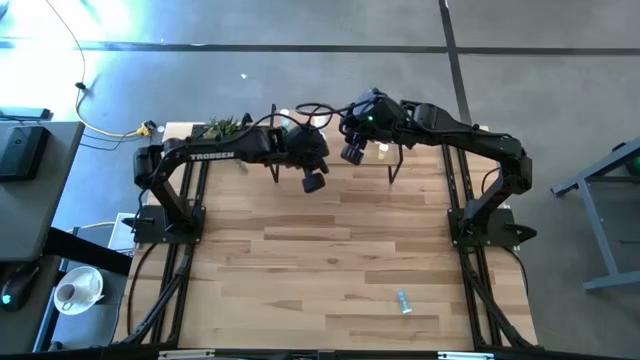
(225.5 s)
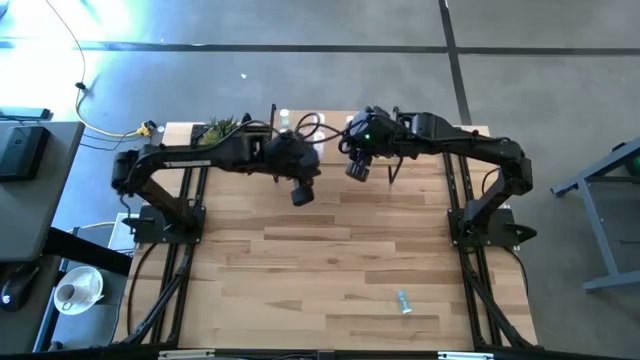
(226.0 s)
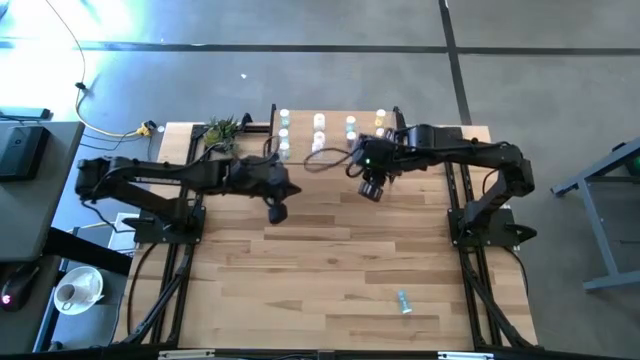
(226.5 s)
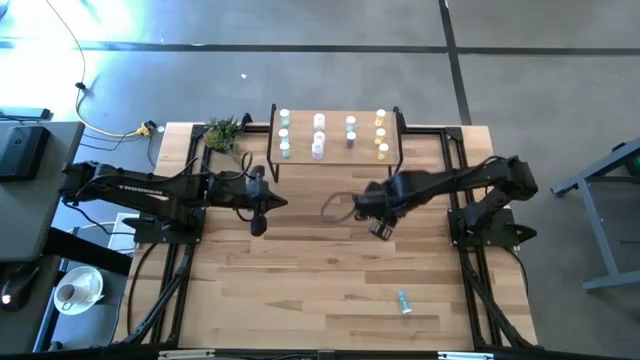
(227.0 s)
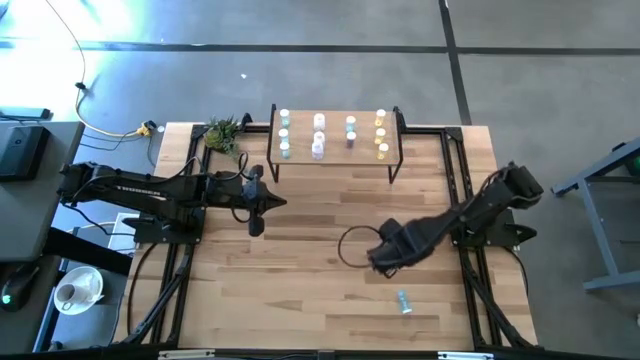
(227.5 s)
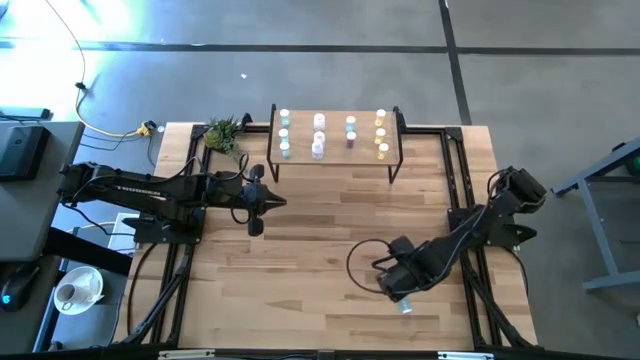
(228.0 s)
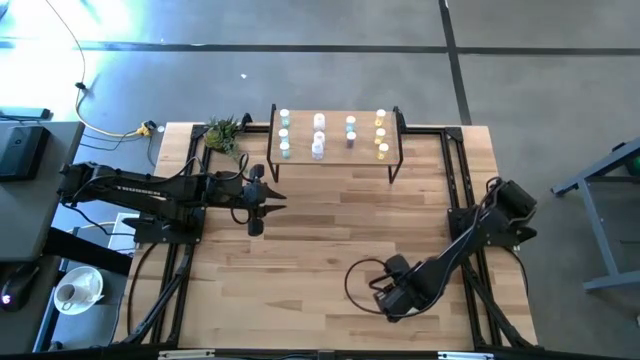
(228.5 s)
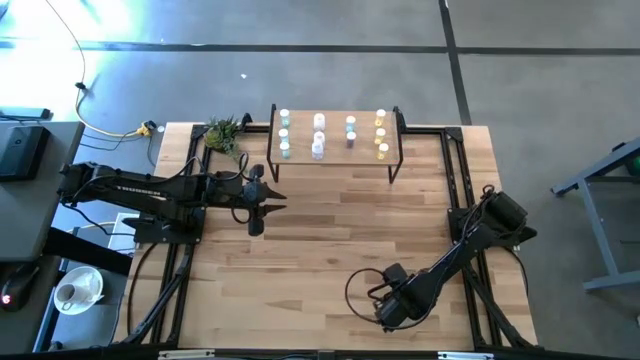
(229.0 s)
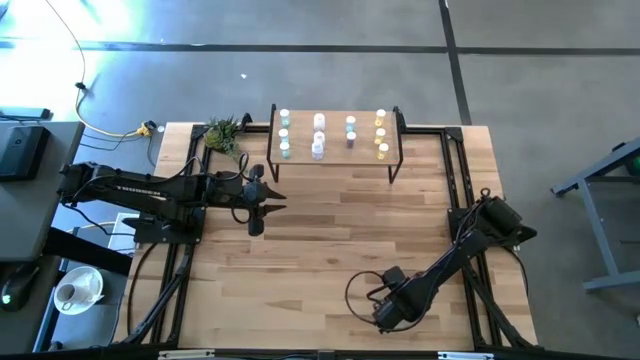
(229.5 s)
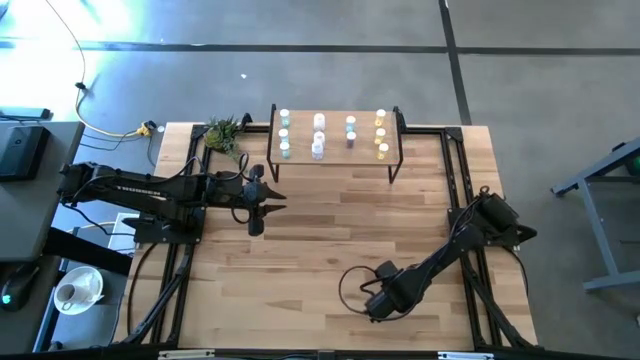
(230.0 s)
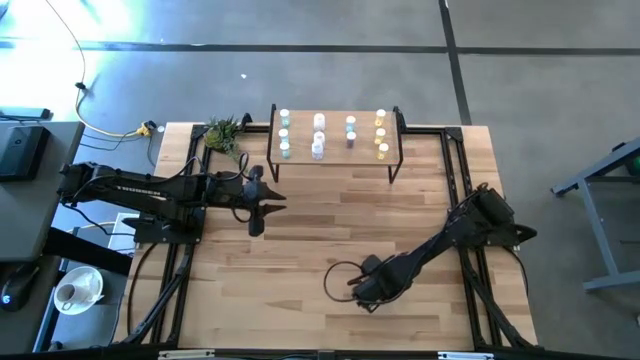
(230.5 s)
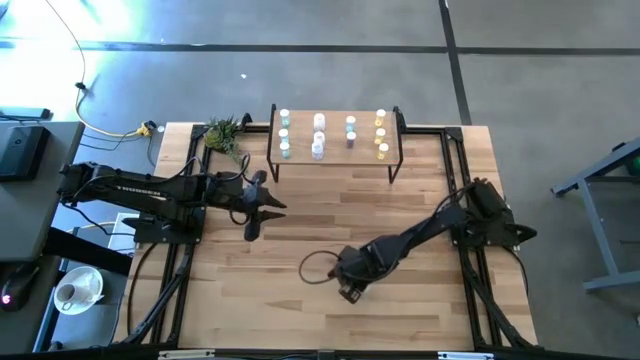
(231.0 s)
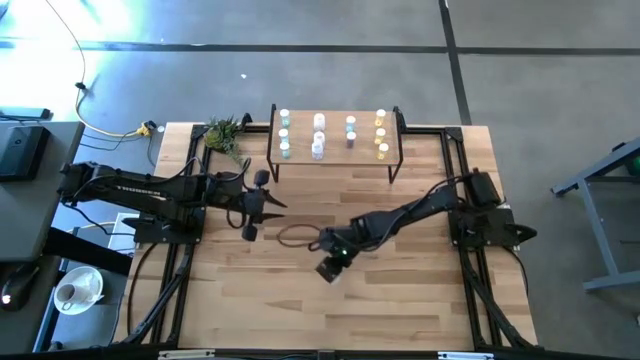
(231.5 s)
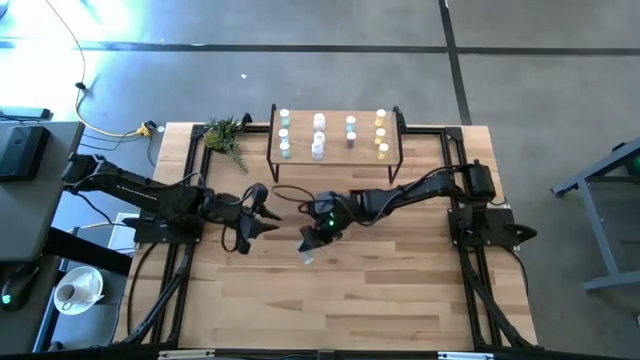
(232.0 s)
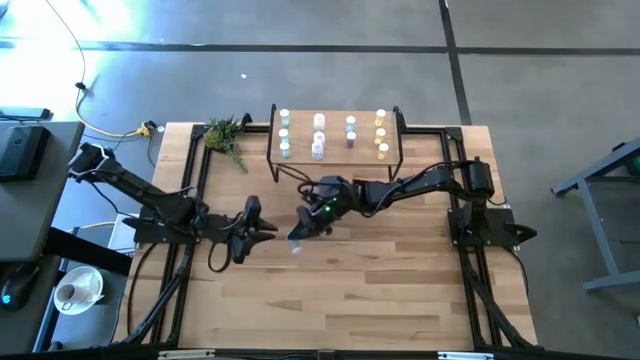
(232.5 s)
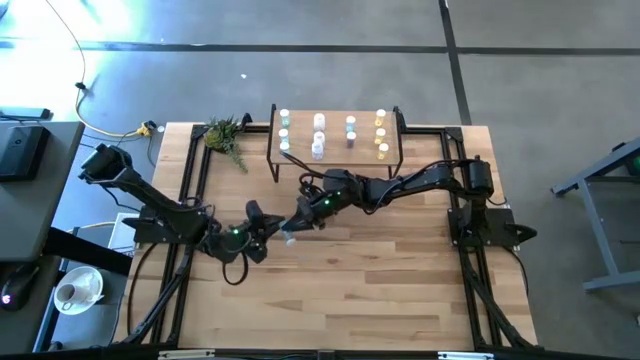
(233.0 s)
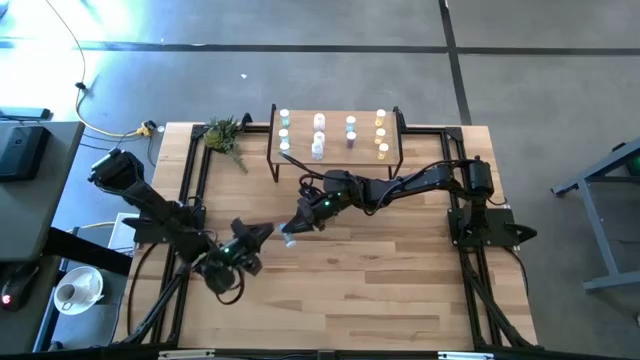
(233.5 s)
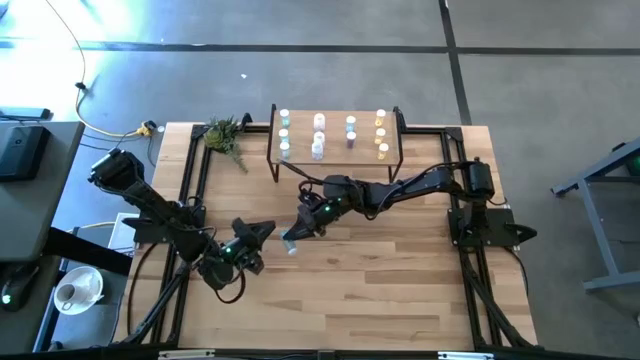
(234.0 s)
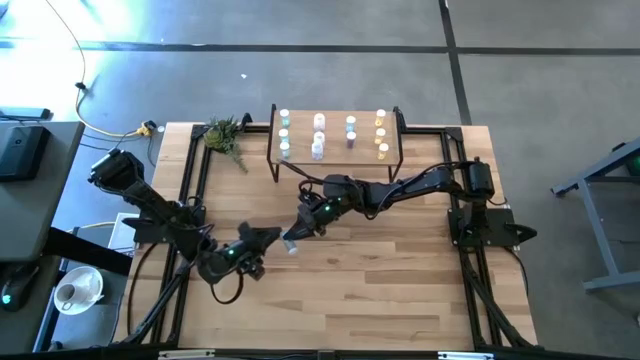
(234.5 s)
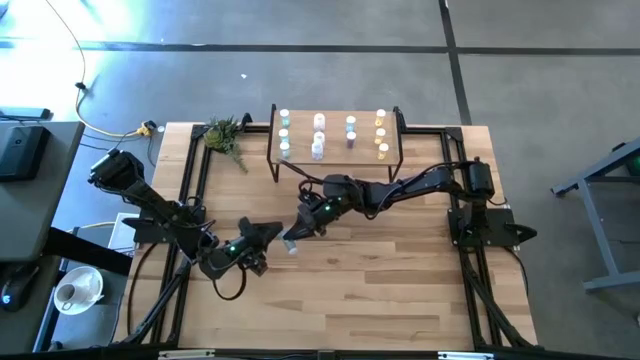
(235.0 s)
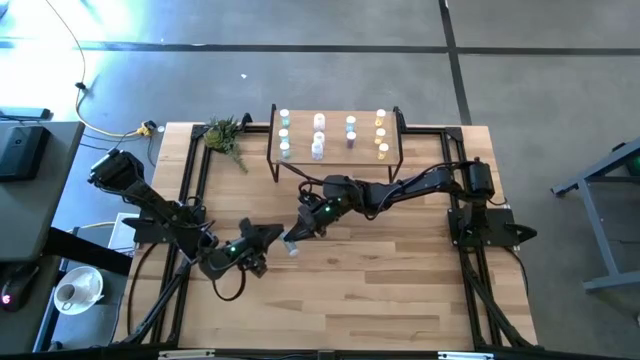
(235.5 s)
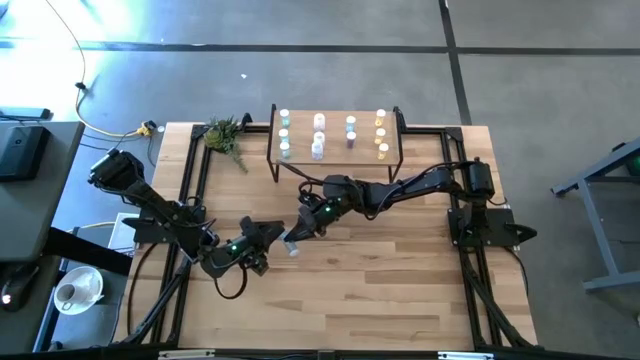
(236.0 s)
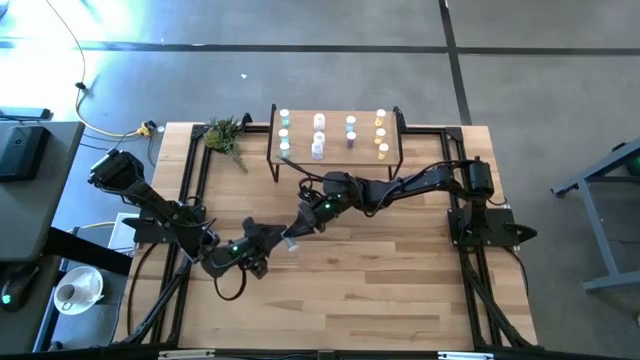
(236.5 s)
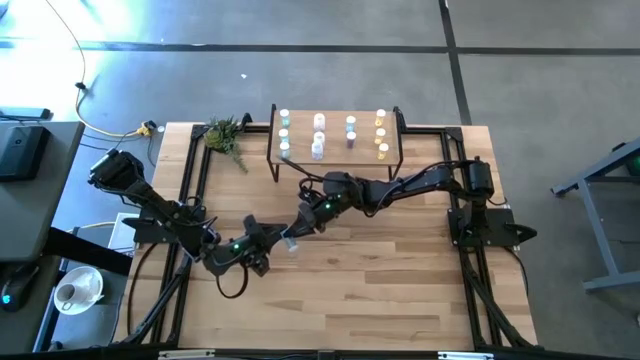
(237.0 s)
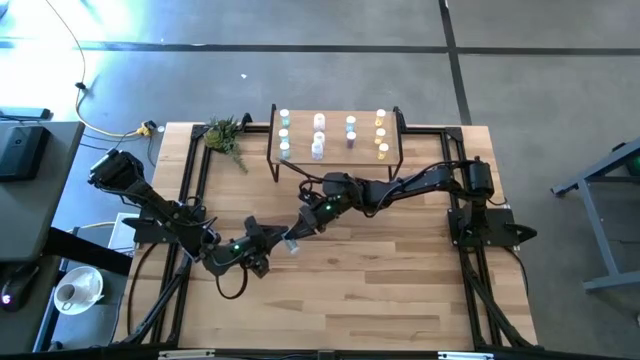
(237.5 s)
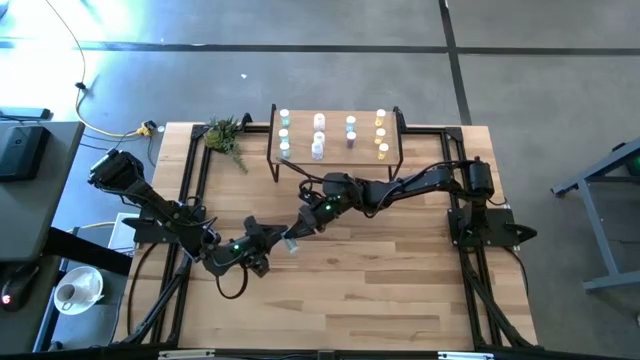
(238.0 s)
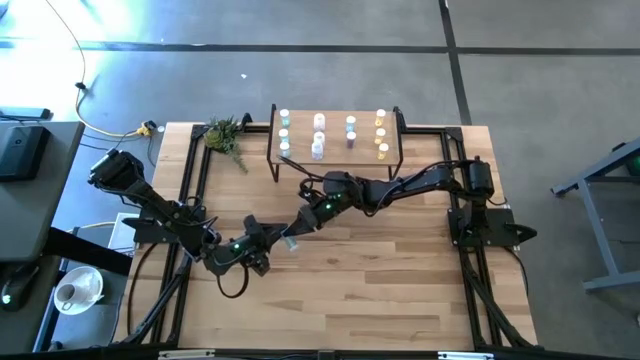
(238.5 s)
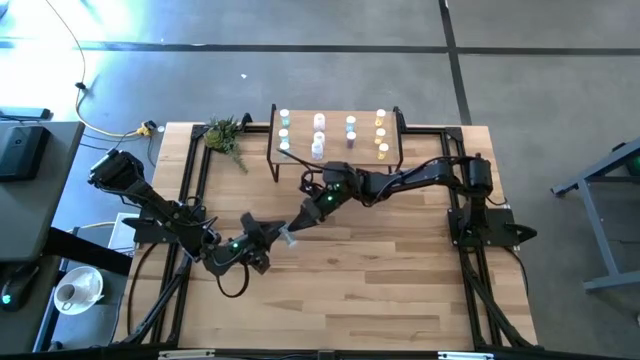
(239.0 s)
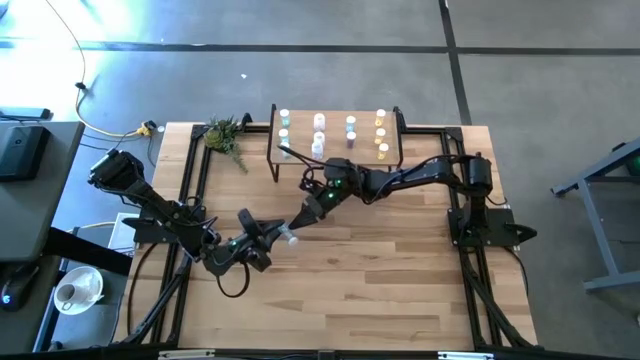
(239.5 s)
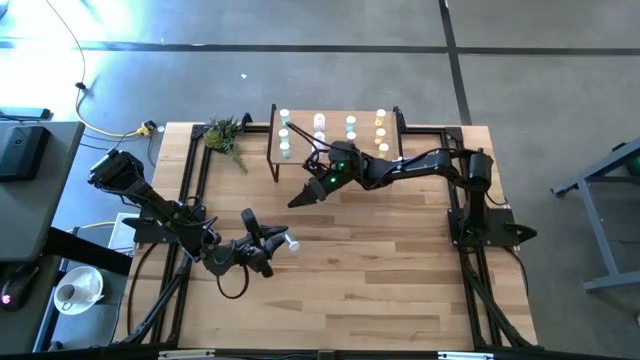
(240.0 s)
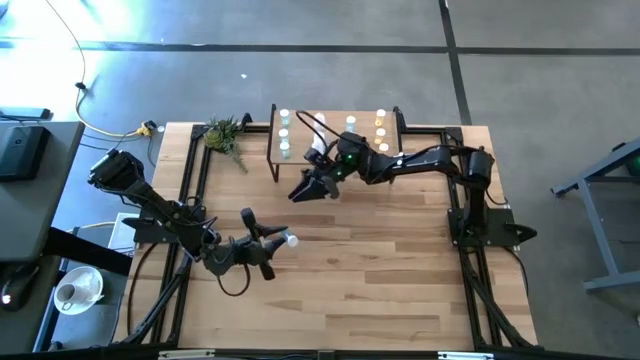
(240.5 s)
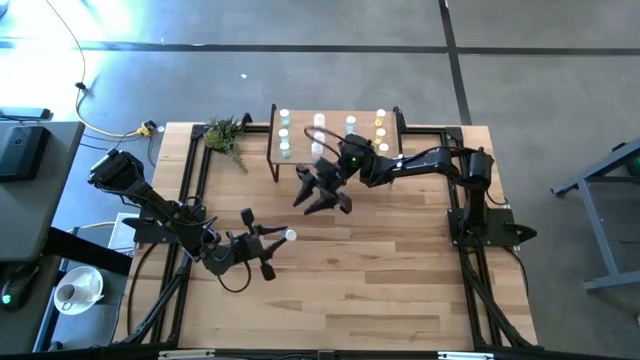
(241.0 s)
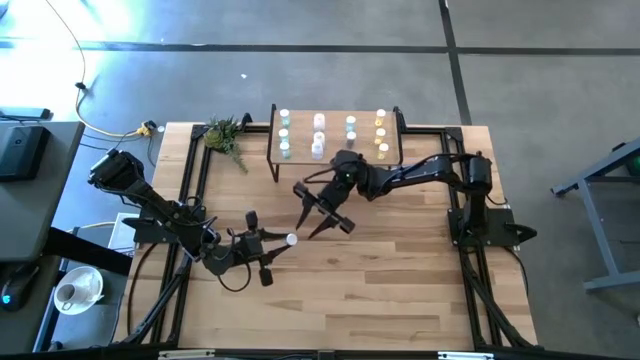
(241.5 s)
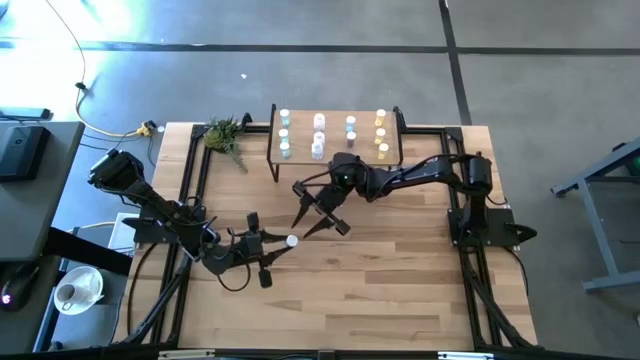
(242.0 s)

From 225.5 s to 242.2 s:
Task: Pick and place medicine bottles onto shelf by color
Put the blue pill bottle on the shelf aligned with the other blue pill bottle

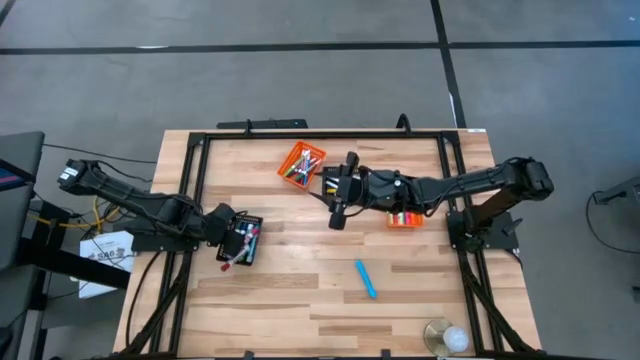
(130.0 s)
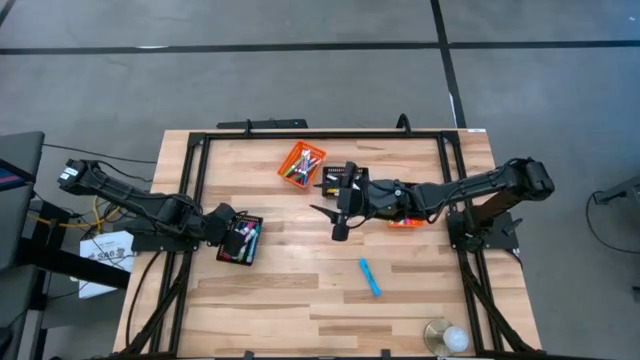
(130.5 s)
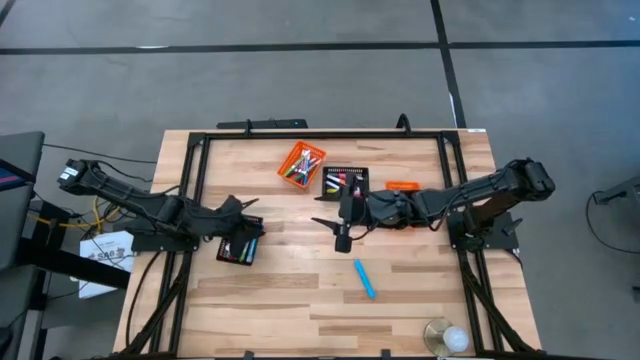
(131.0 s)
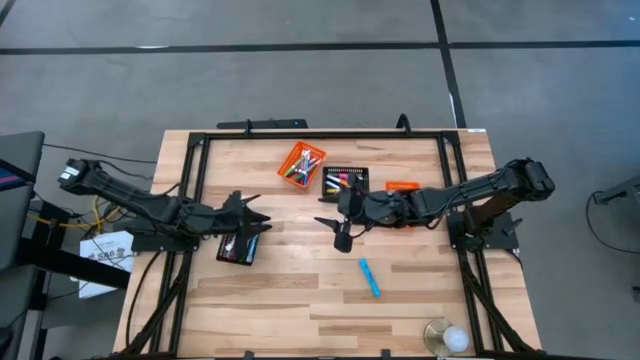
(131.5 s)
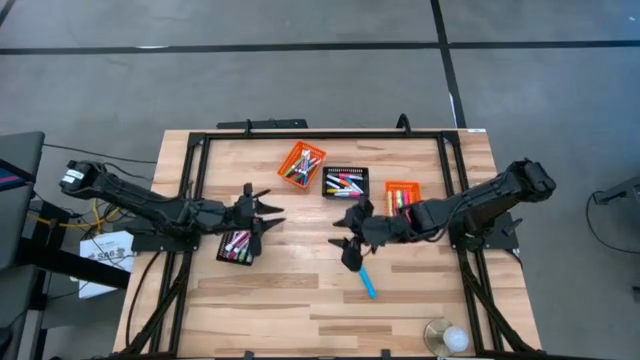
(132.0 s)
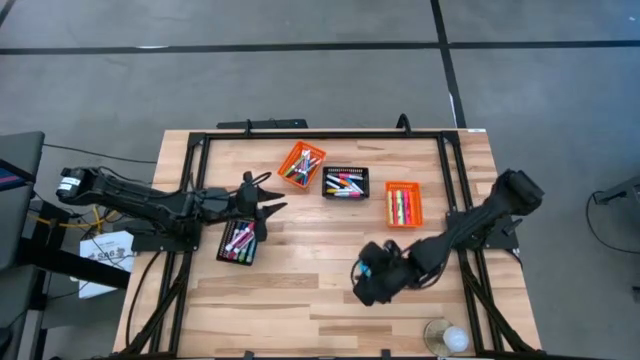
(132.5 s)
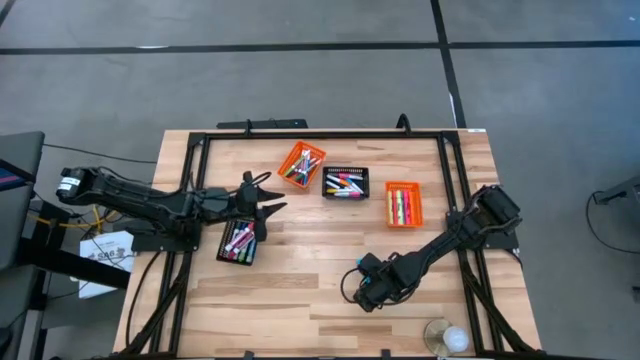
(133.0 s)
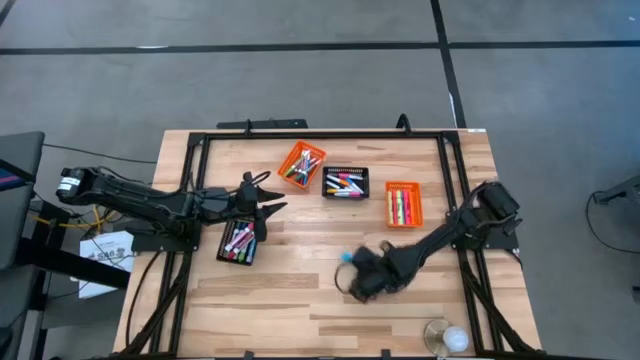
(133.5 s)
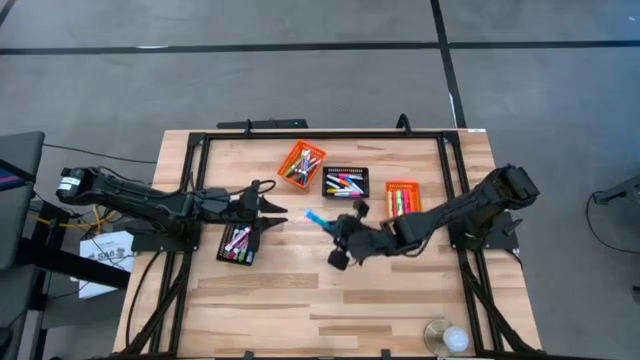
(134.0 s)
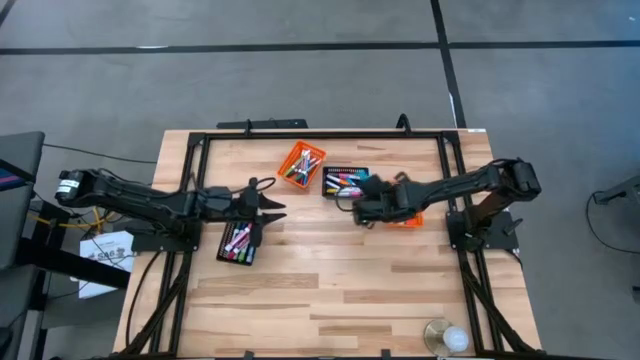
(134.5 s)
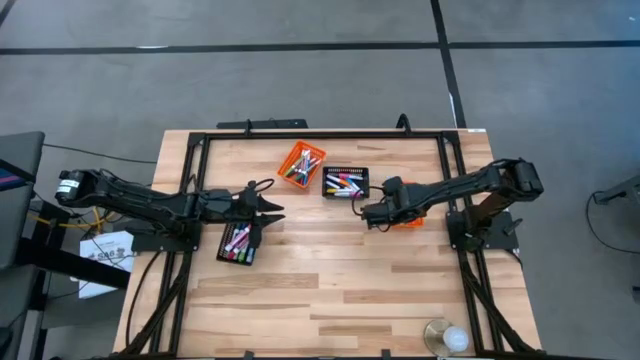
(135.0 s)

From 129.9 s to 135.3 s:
Task: Pick & Place Markers
Put the light blue highlighter into the right orange bin
